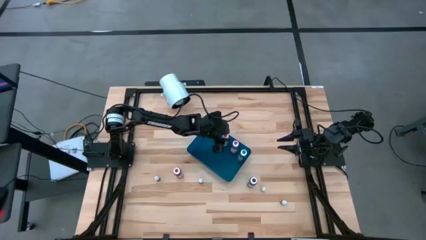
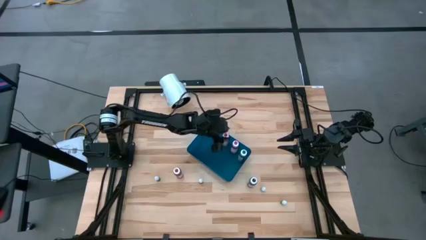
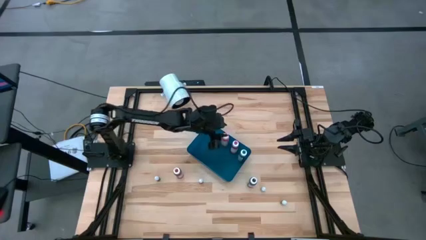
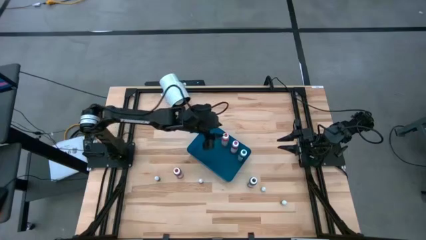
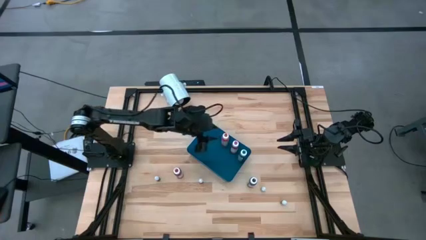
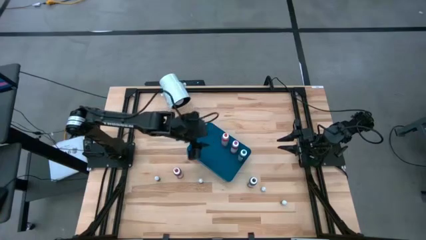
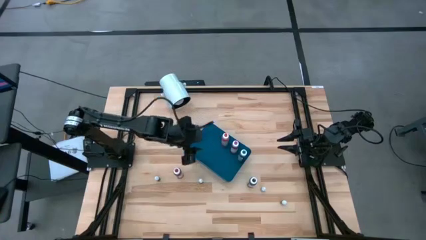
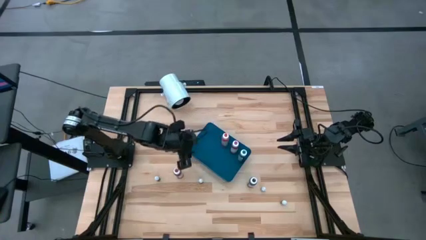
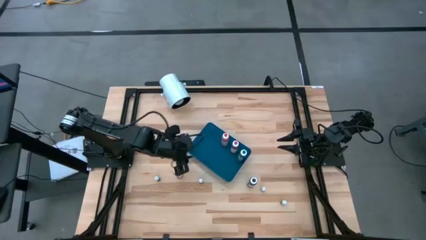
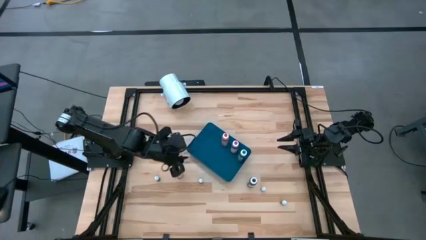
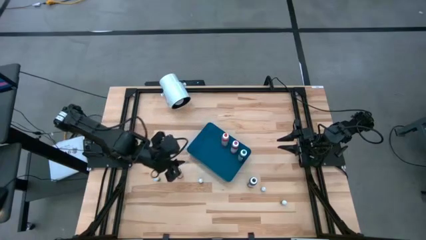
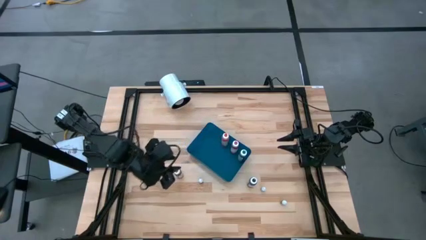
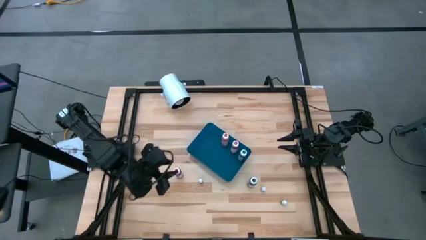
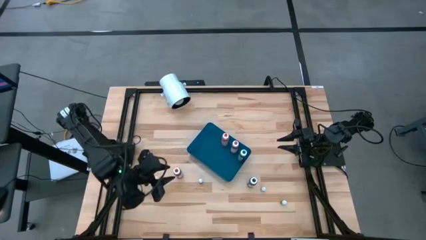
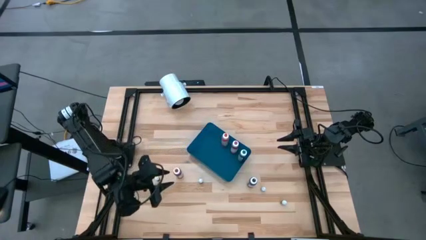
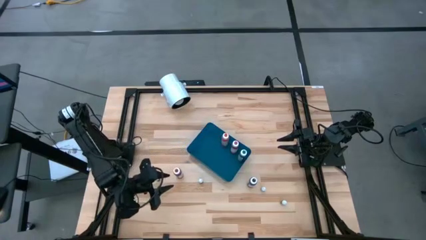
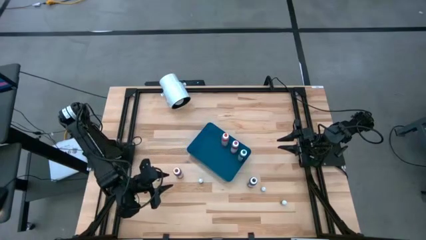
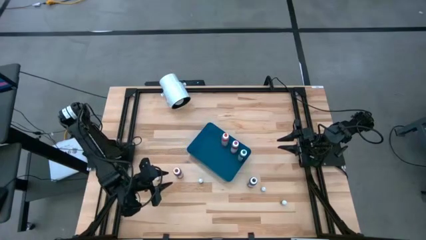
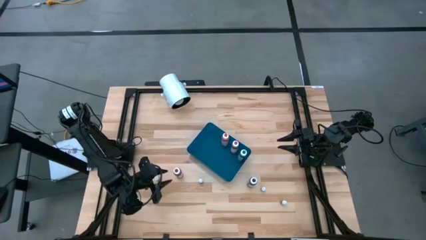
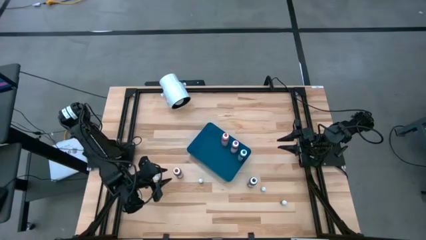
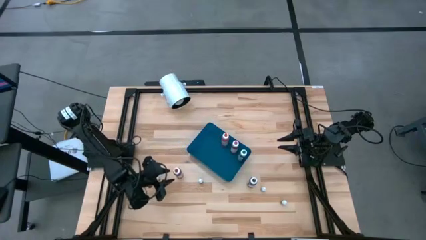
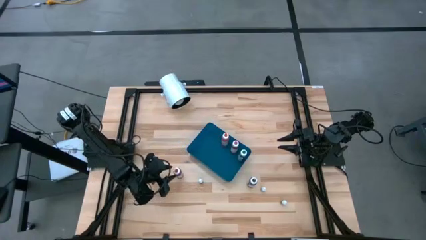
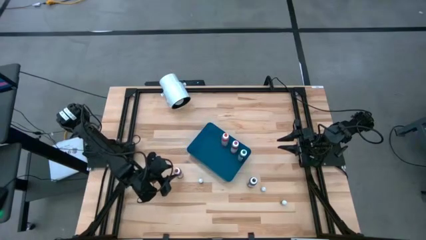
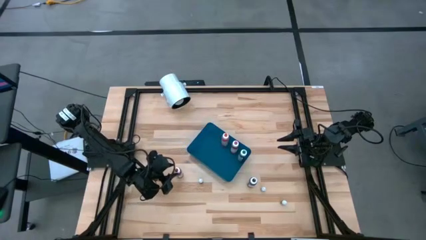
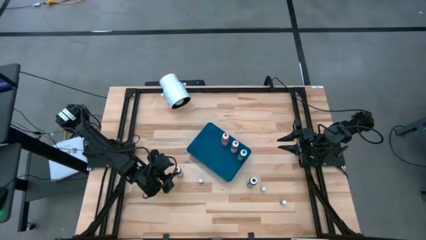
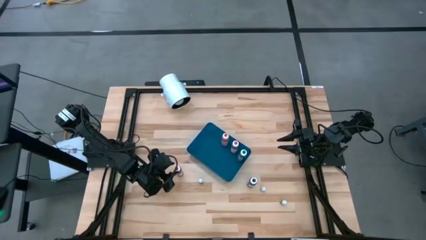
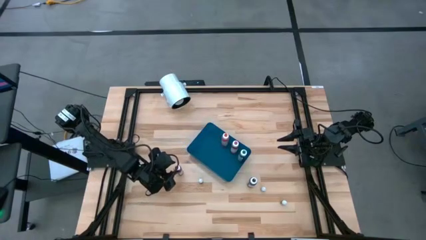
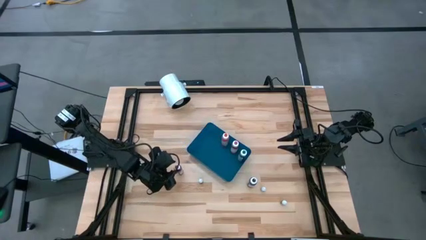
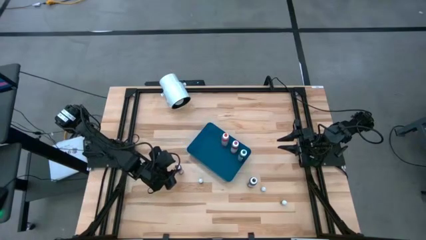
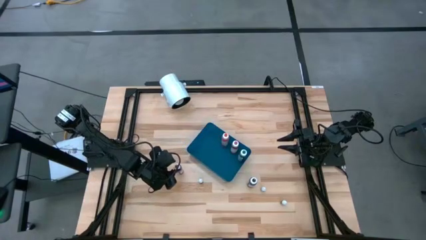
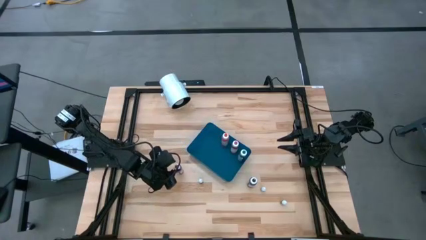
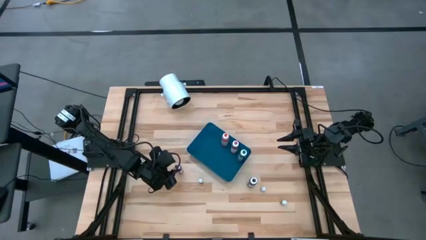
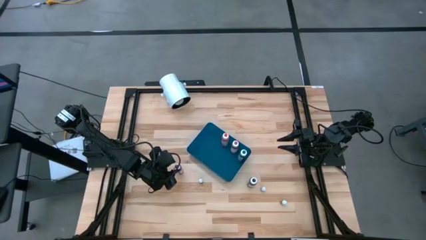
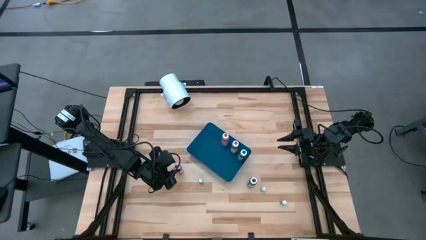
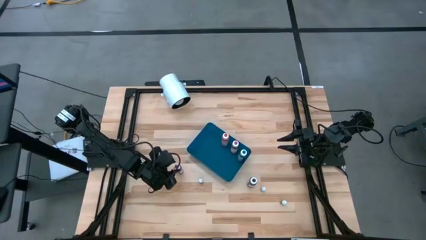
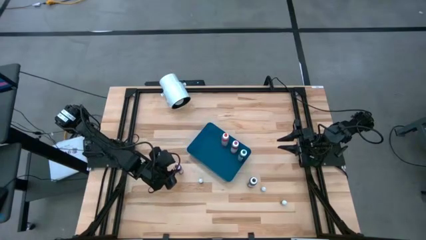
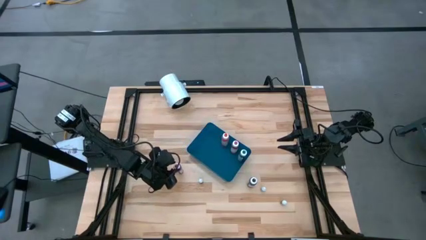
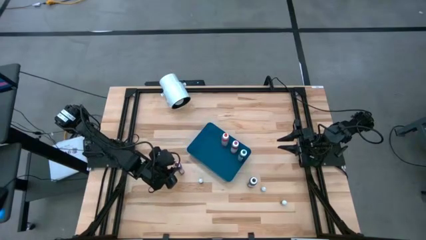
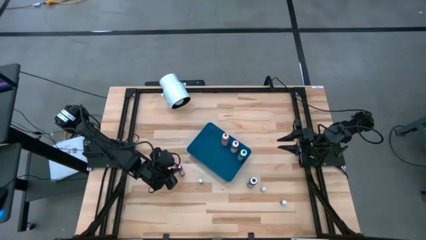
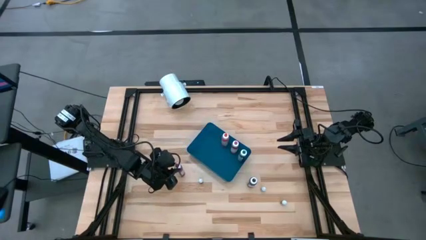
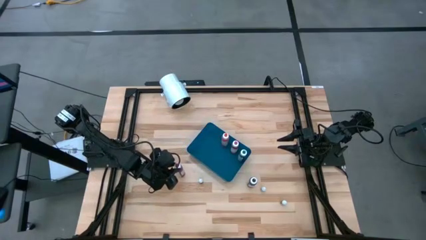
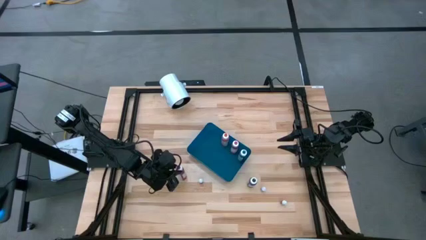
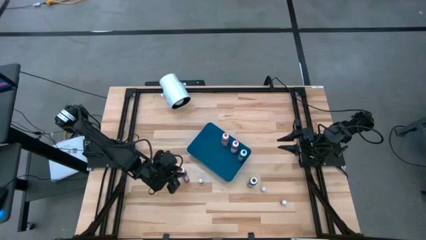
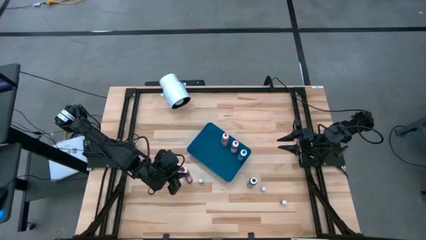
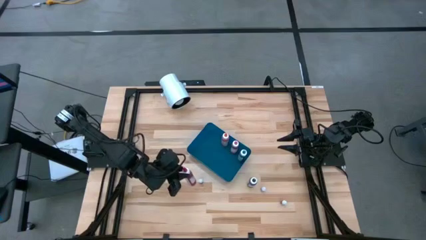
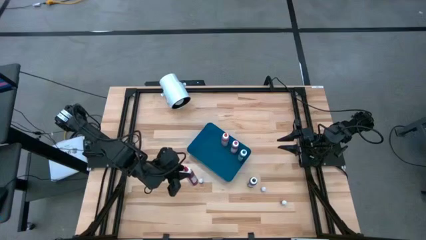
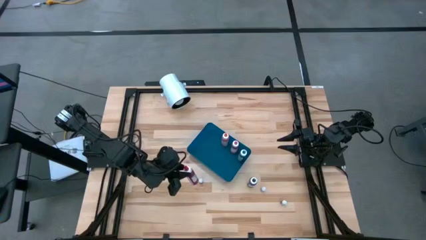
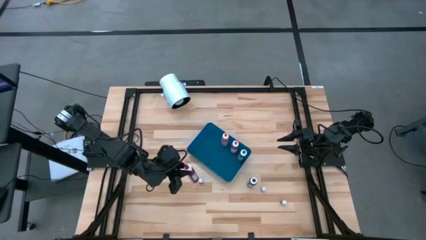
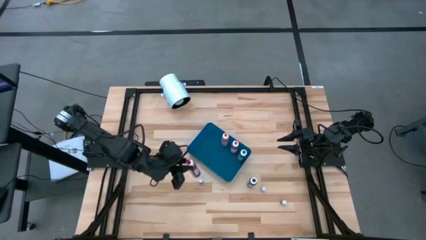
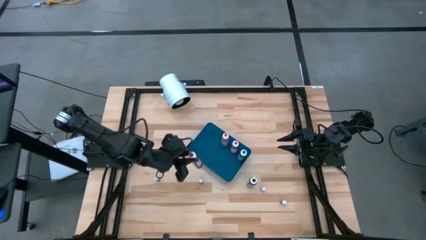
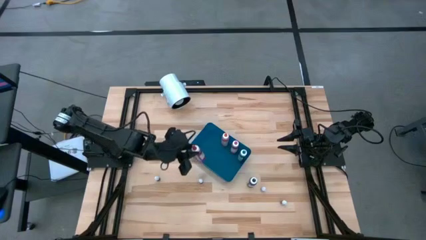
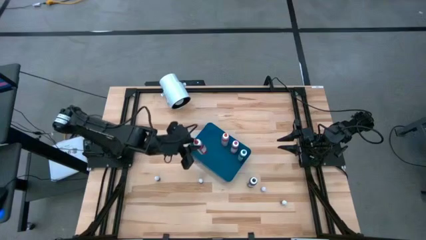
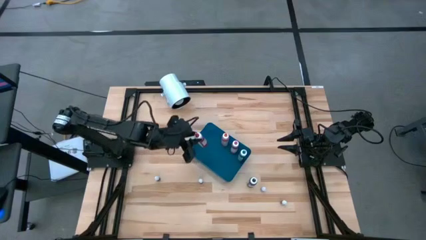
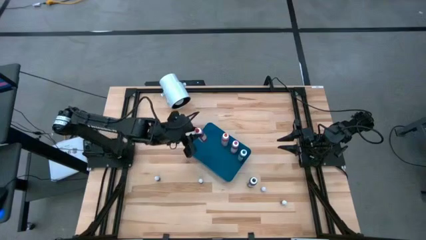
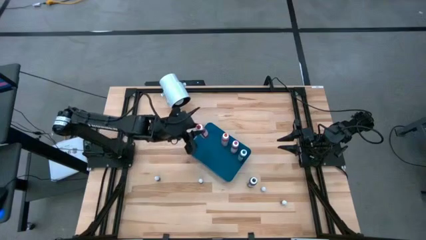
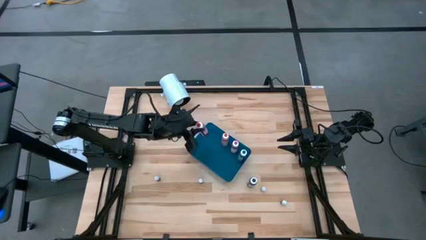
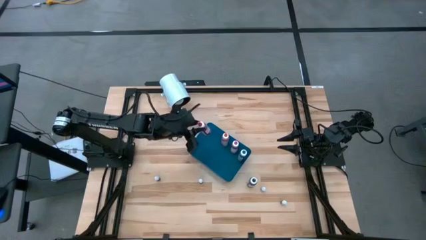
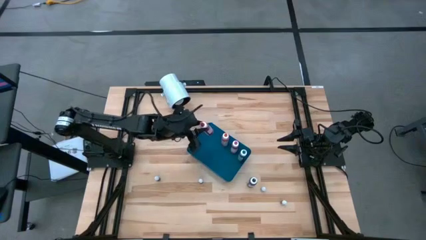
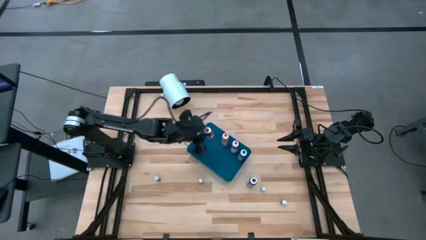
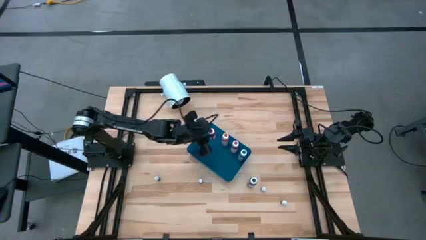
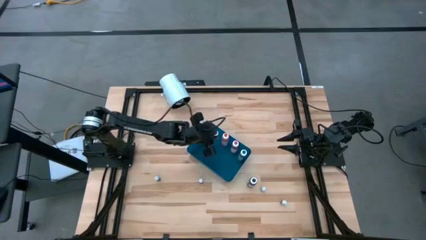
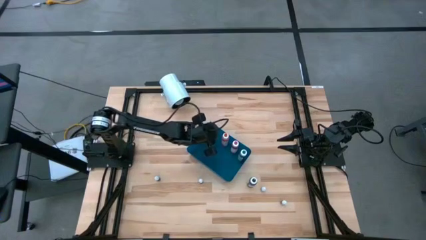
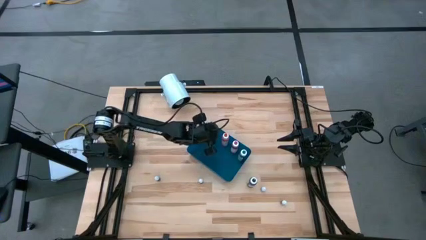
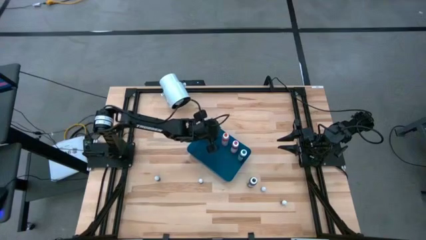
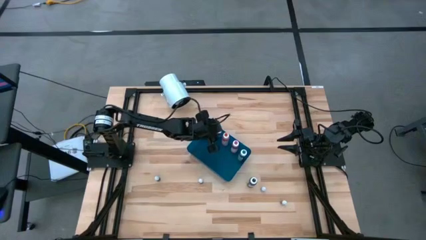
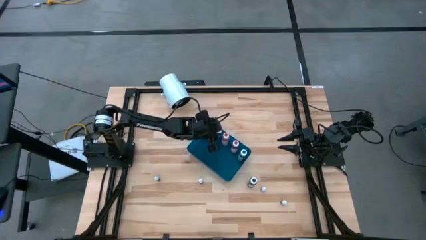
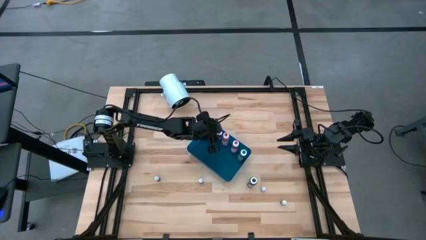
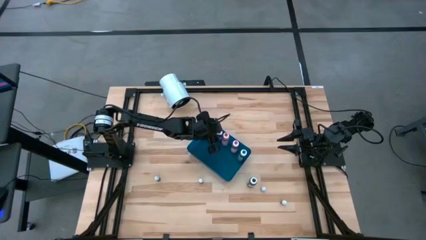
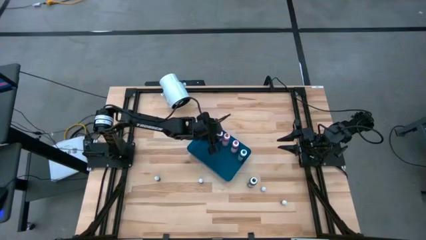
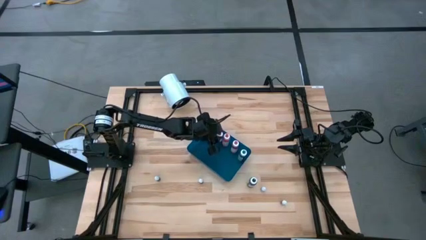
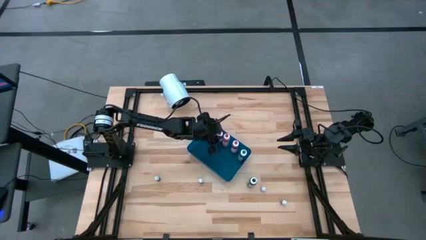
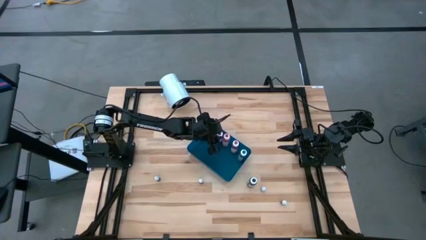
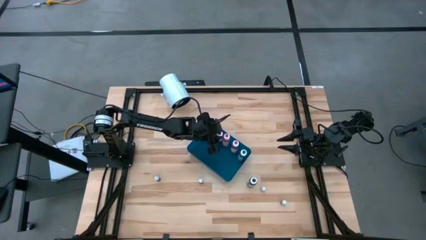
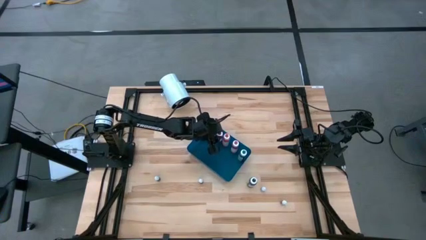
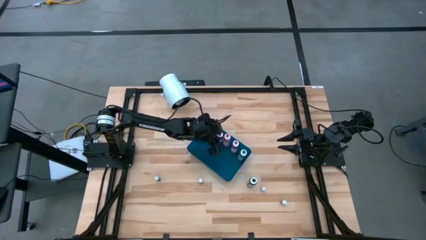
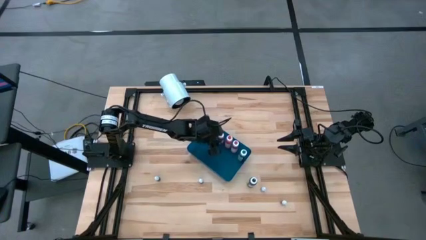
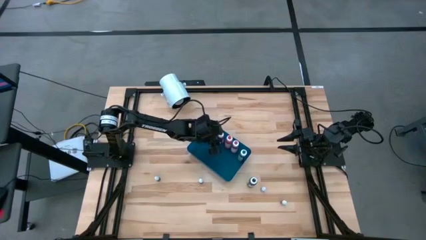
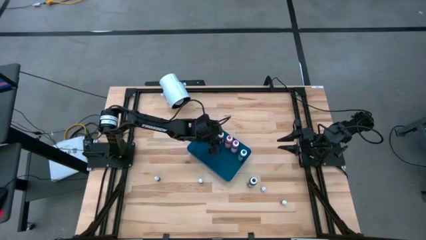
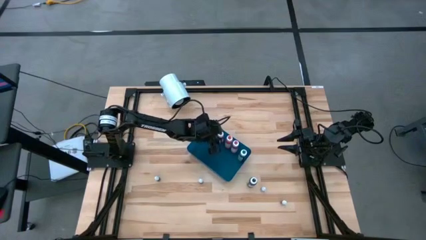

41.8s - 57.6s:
Task: Pick & Place food coloring
Put the big red food coloring bottle into the blue bin
